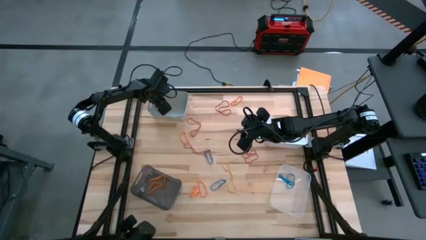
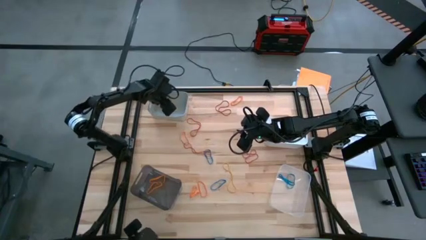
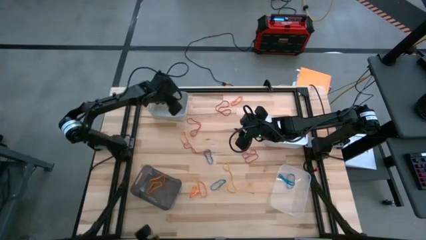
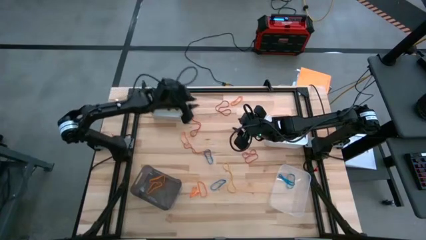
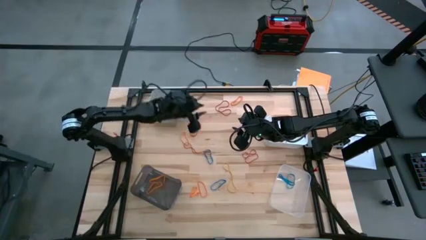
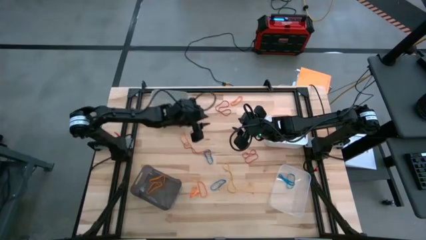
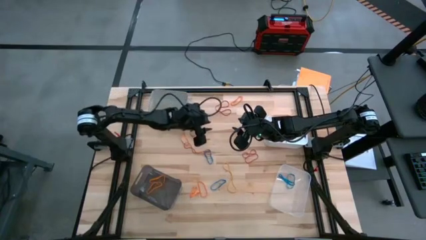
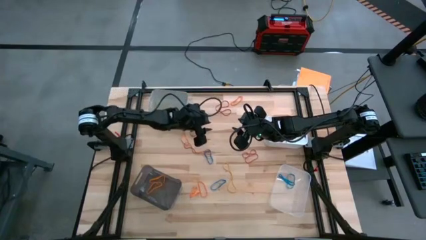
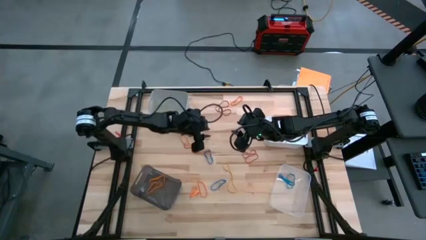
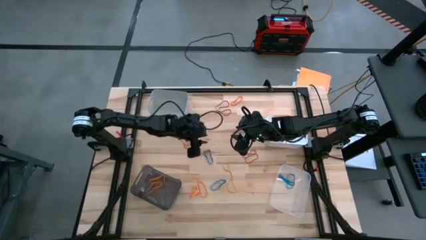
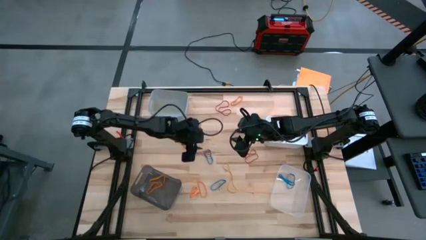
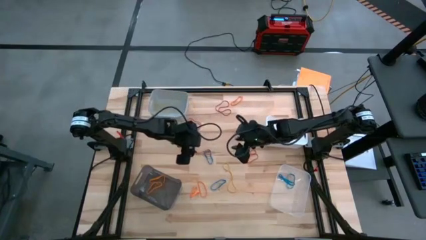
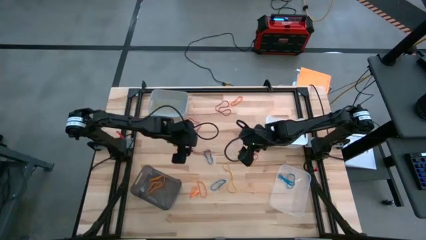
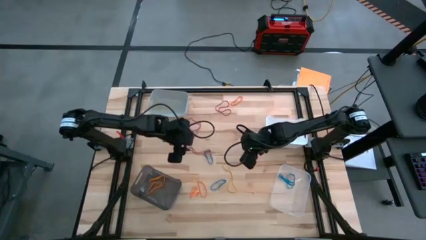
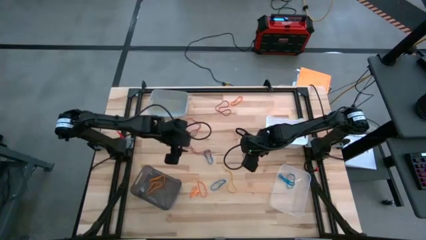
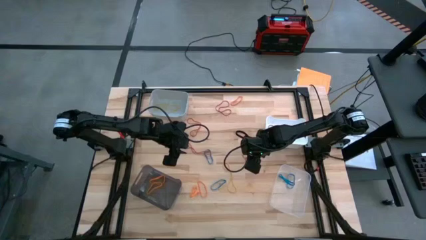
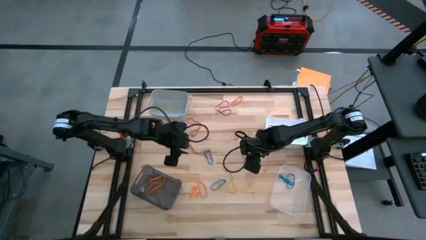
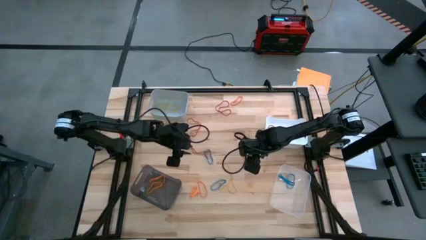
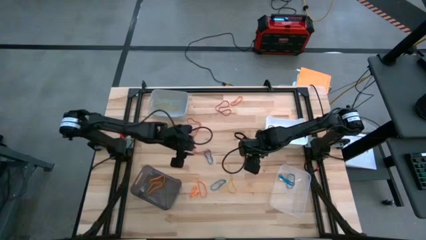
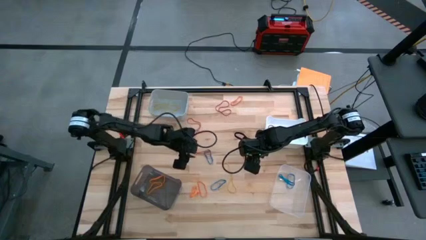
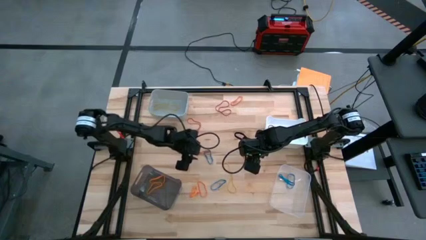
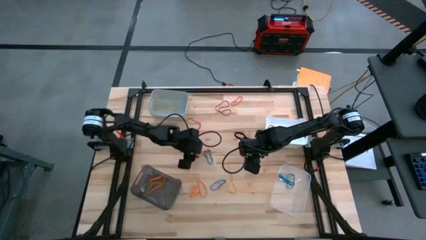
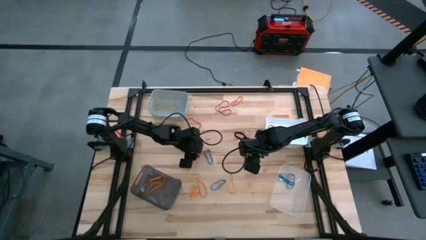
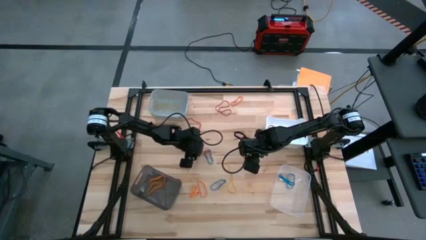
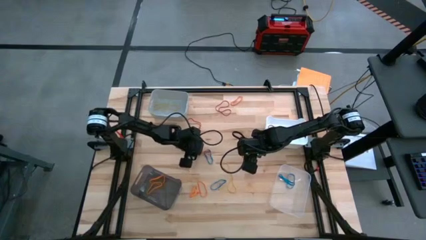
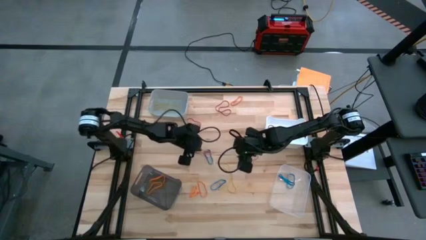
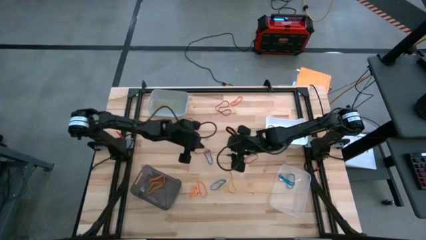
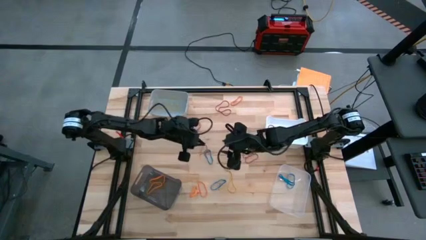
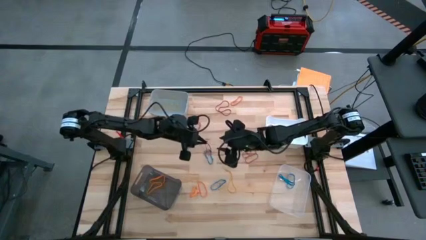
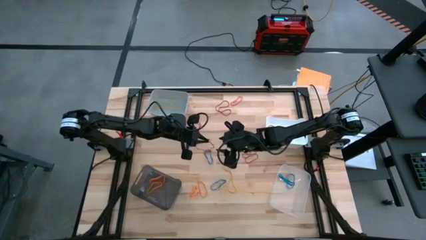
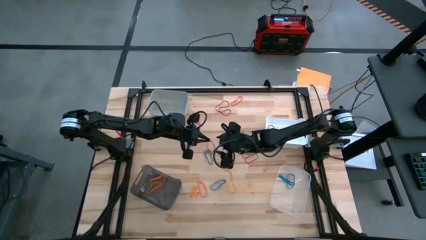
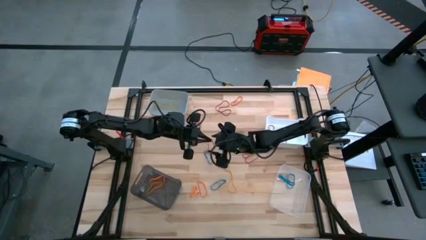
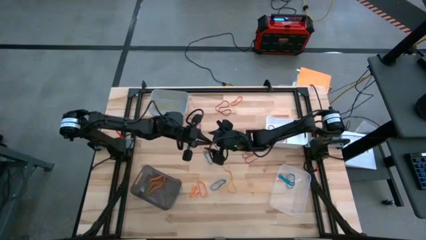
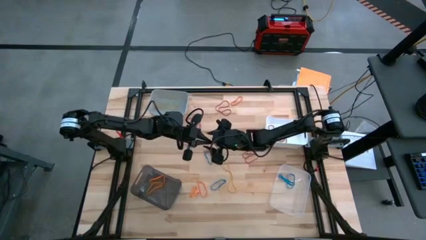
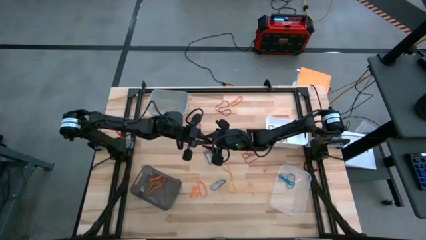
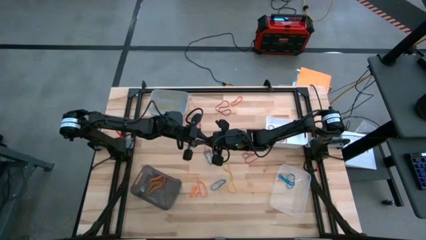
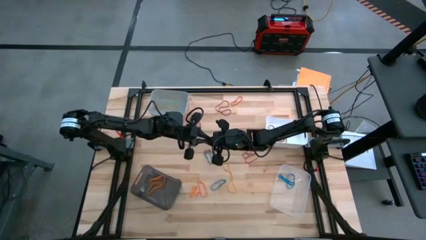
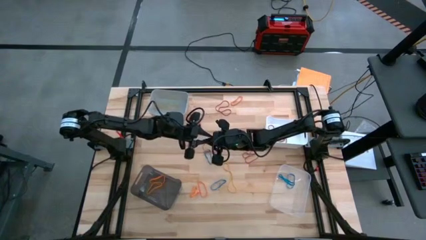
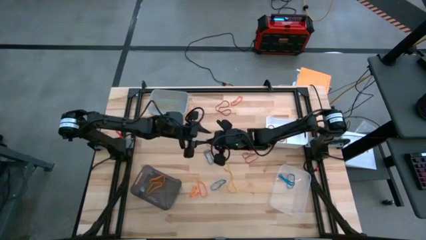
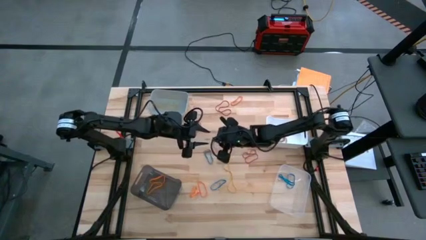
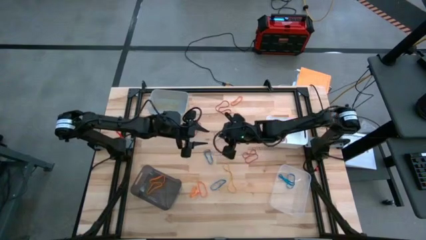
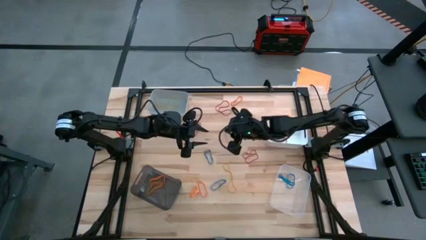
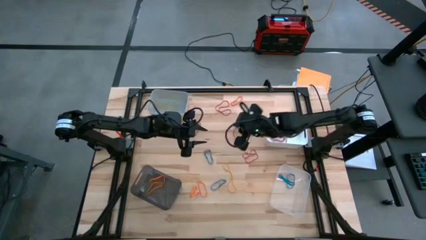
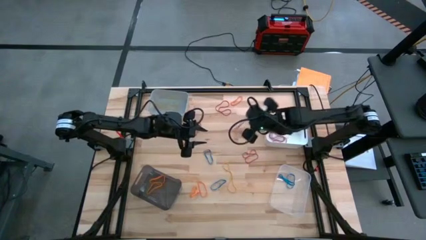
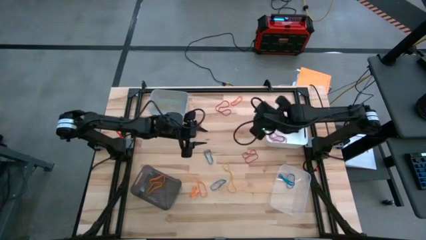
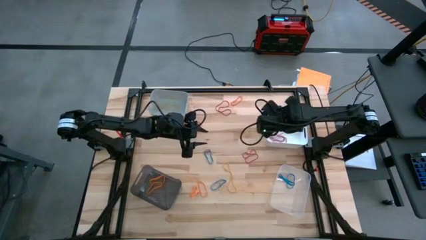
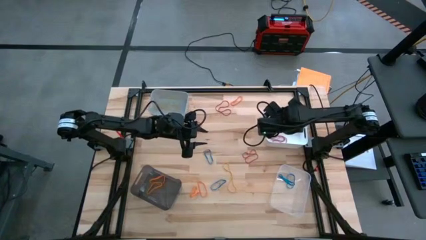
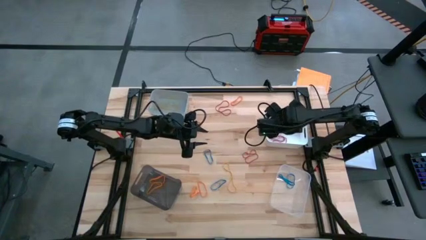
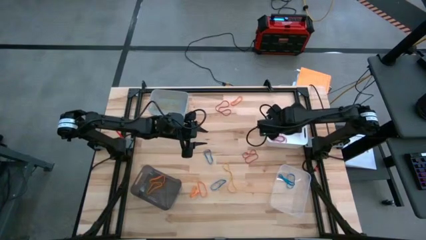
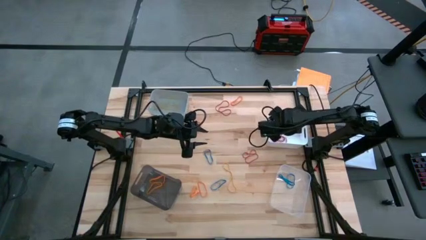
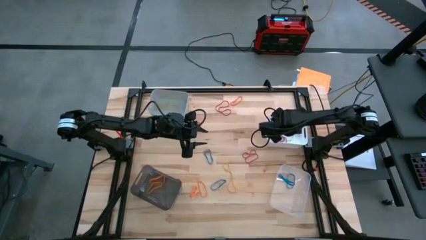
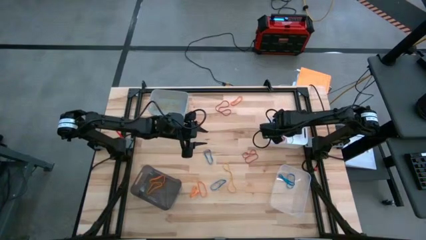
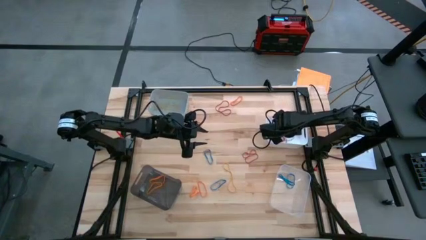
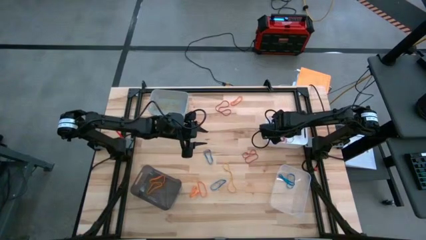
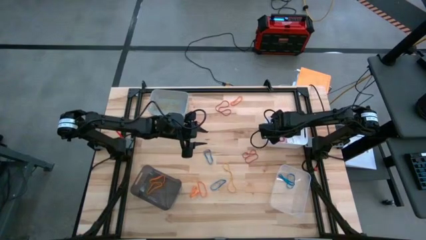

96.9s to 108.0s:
Task: Sort rubber bands into baskets
Put the red rubber band into the white bin

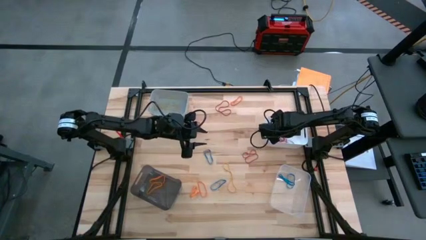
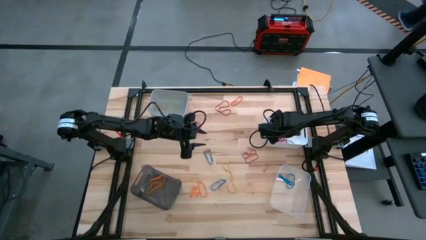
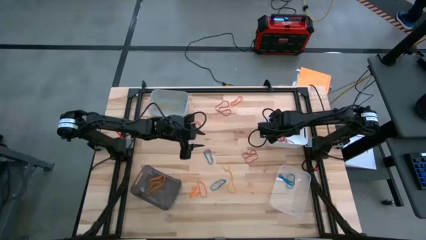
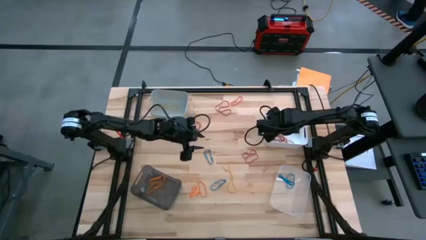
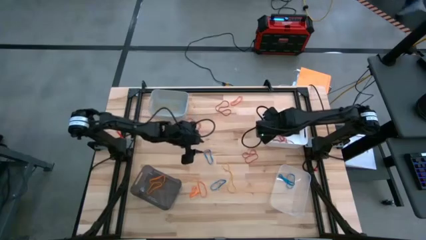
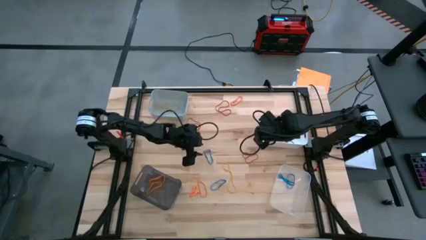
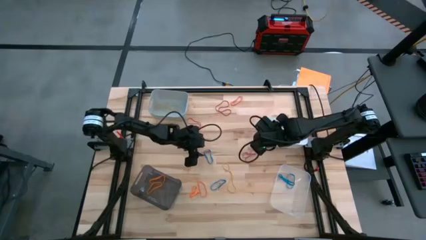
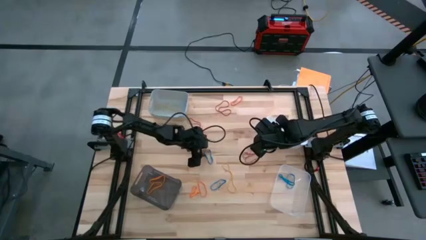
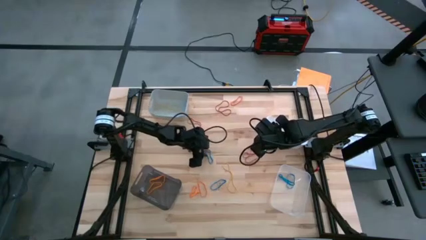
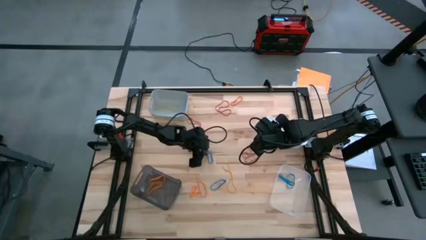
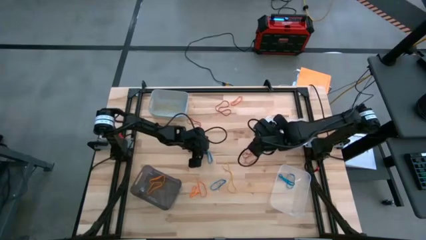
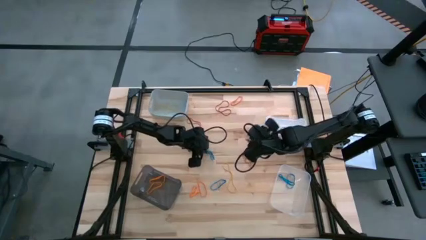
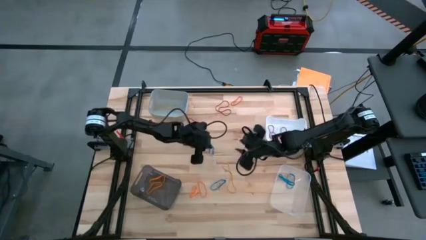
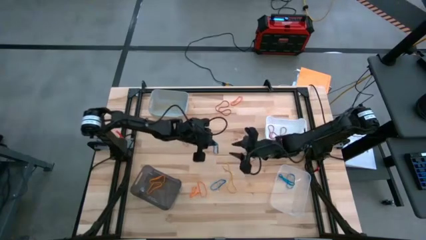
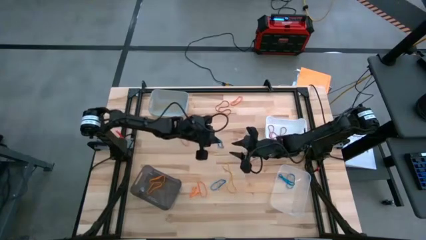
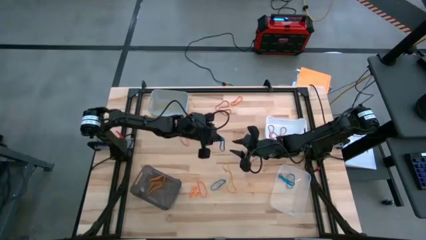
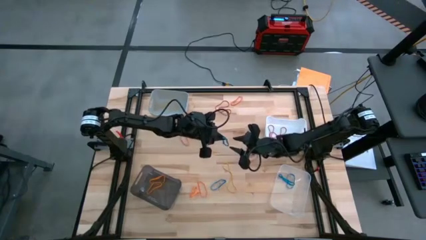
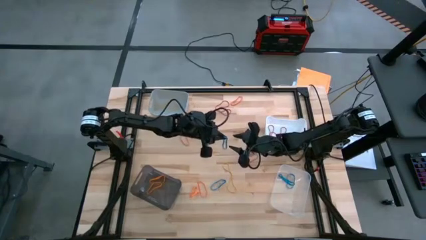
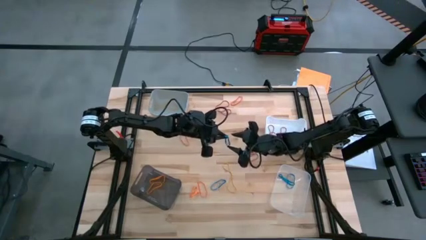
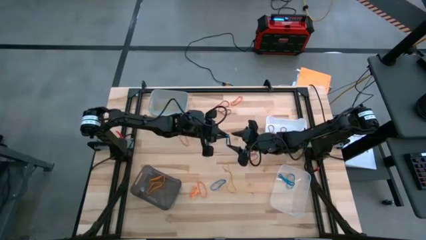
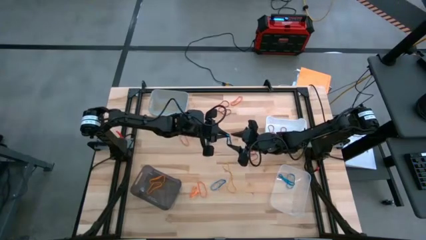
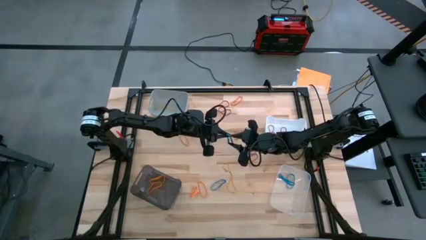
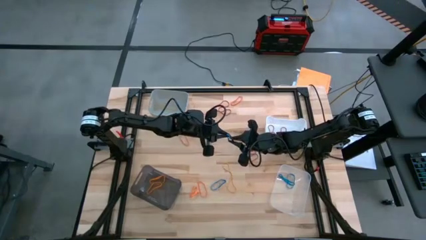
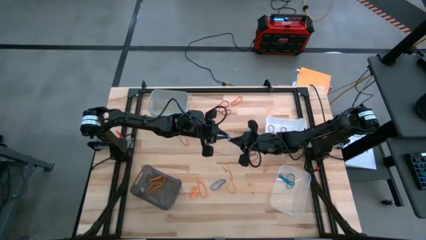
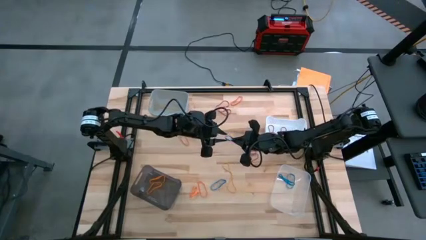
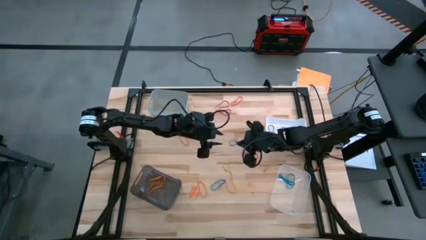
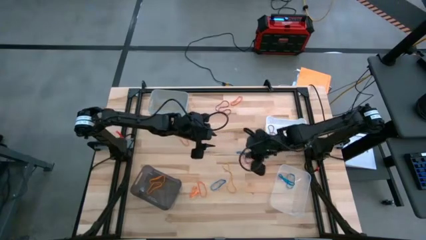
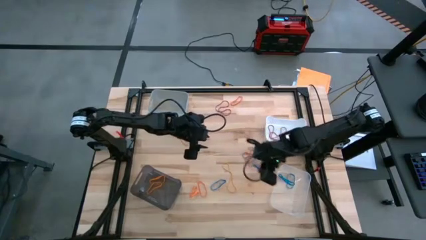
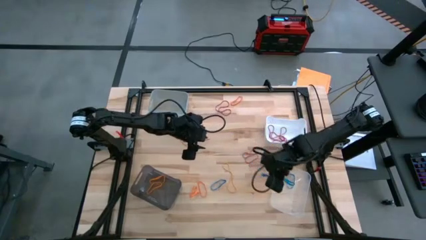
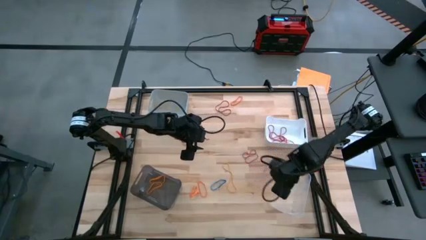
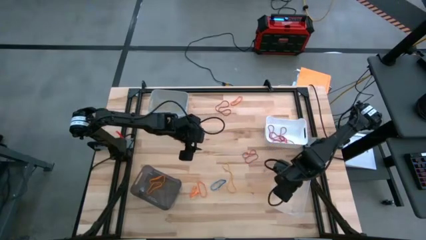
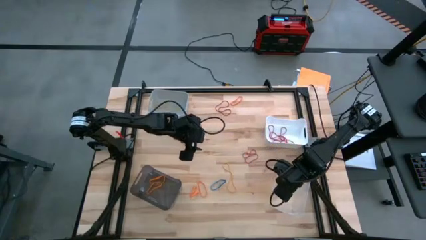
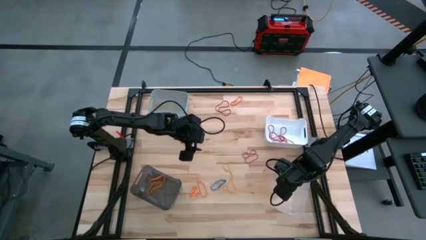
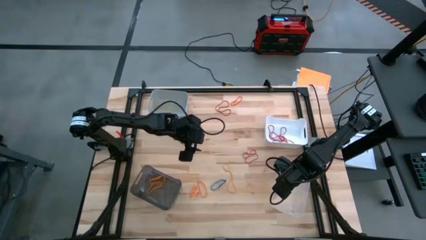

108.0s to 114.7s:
Put the blue rubber band into the transparent bin
